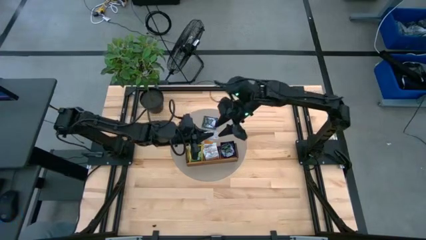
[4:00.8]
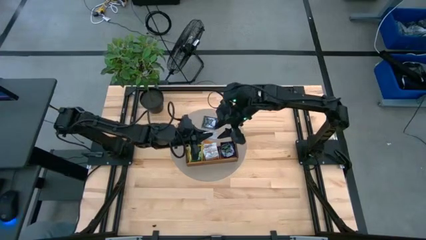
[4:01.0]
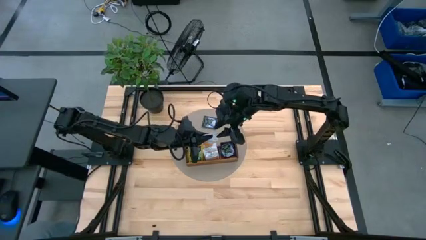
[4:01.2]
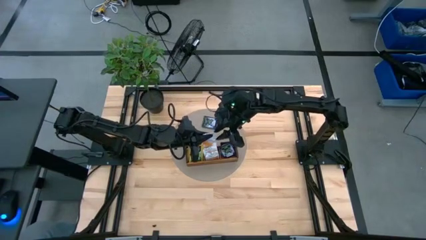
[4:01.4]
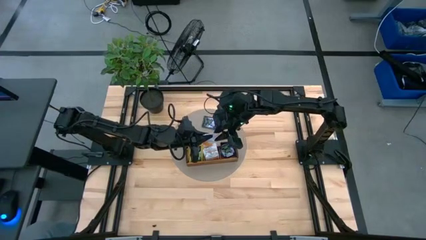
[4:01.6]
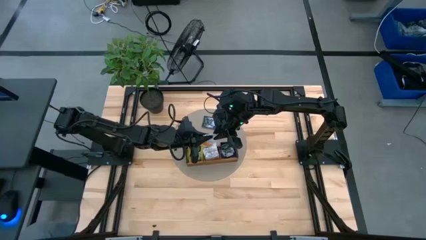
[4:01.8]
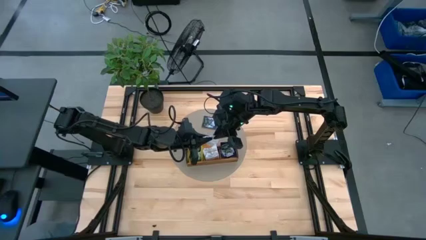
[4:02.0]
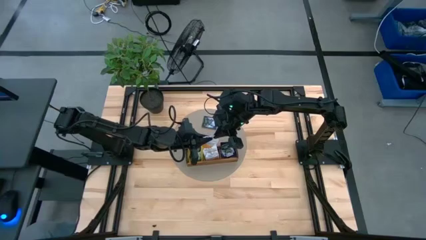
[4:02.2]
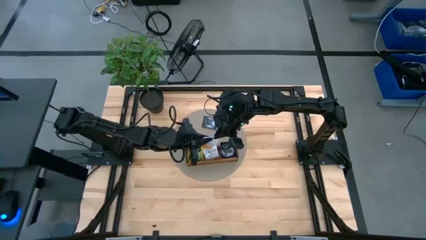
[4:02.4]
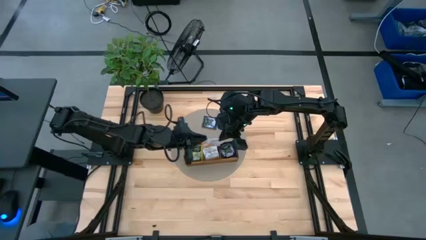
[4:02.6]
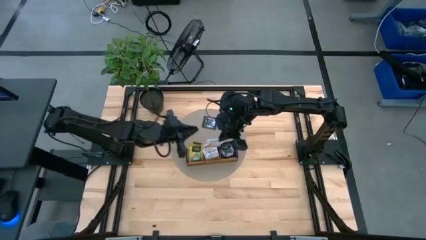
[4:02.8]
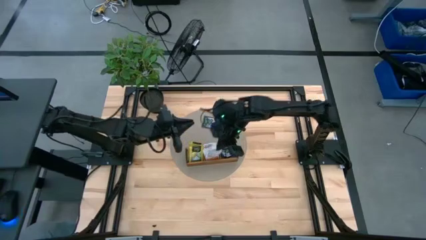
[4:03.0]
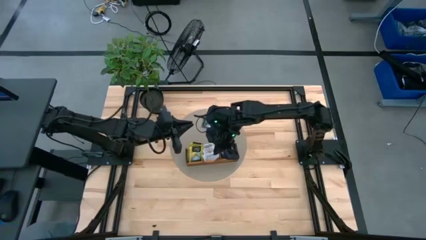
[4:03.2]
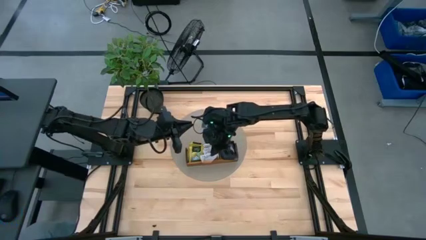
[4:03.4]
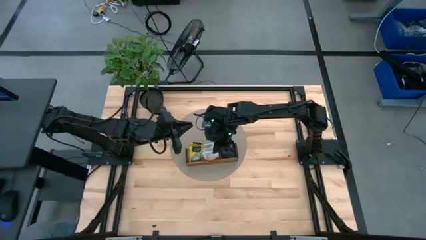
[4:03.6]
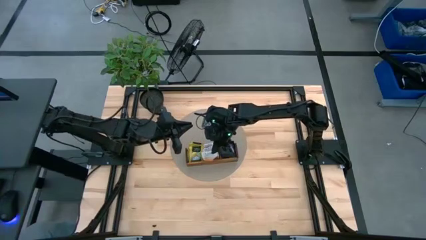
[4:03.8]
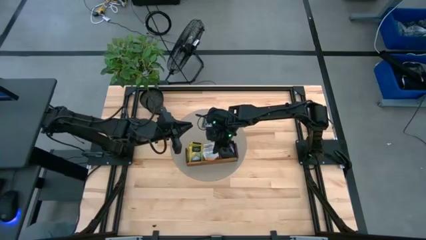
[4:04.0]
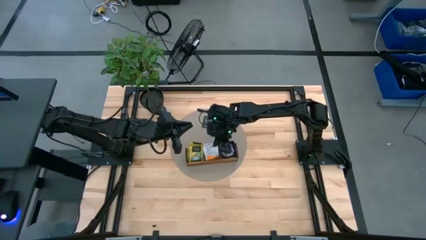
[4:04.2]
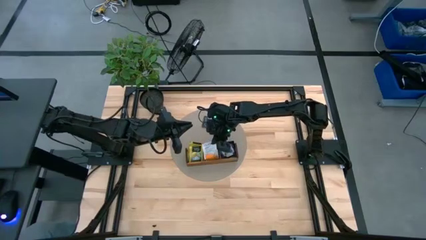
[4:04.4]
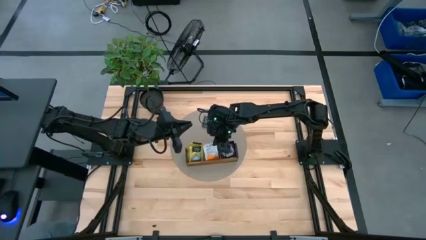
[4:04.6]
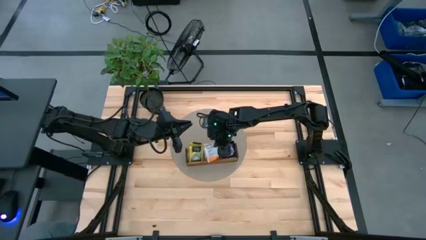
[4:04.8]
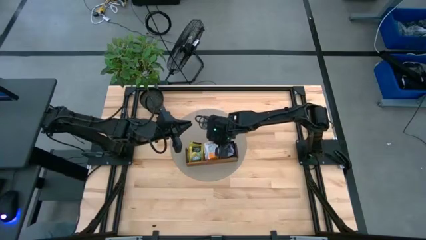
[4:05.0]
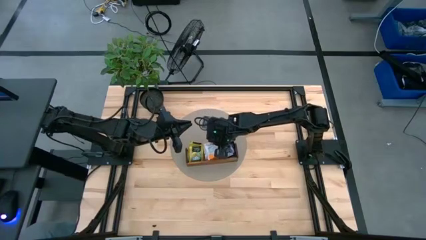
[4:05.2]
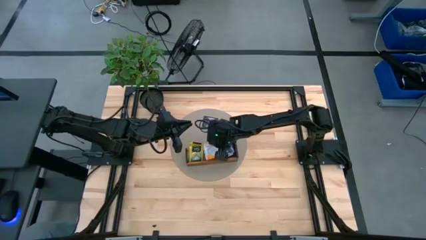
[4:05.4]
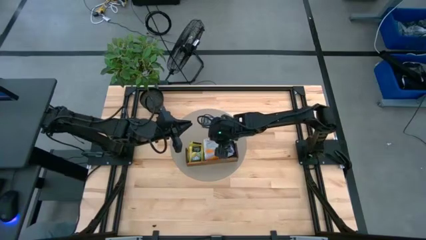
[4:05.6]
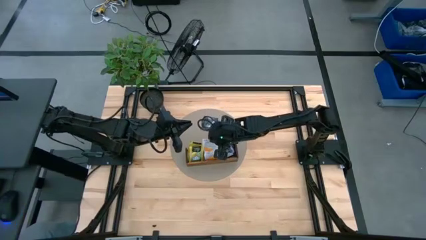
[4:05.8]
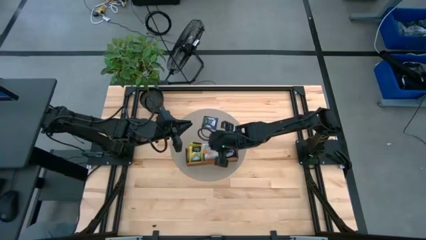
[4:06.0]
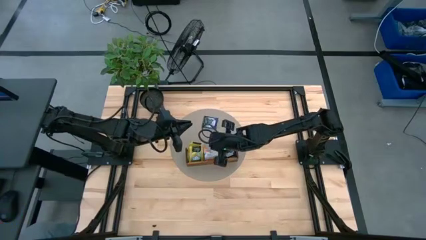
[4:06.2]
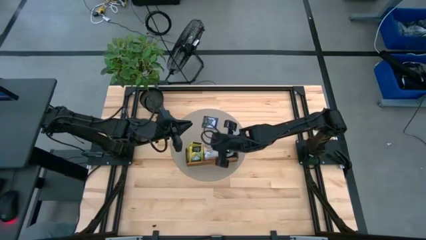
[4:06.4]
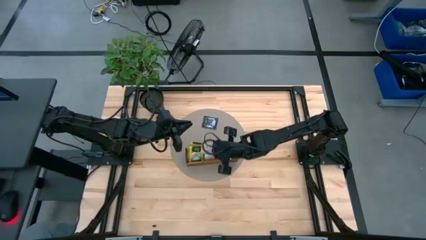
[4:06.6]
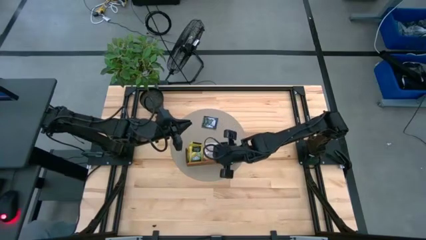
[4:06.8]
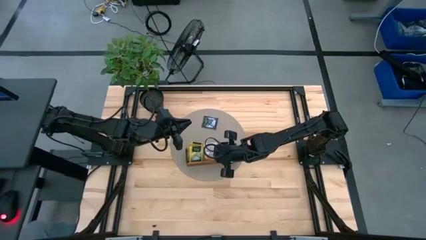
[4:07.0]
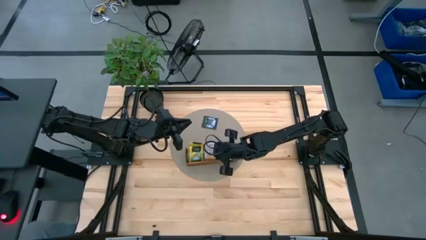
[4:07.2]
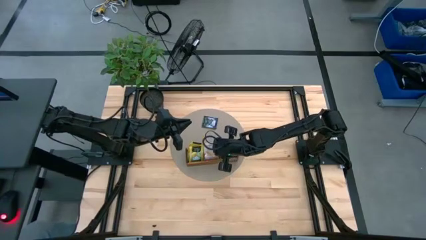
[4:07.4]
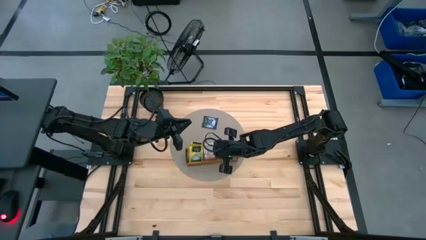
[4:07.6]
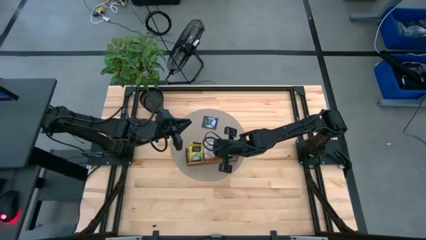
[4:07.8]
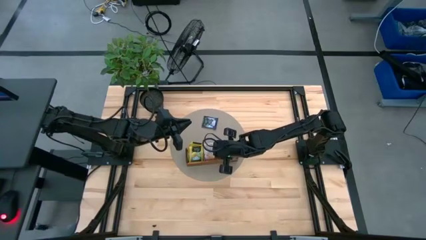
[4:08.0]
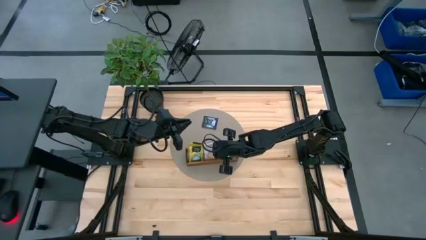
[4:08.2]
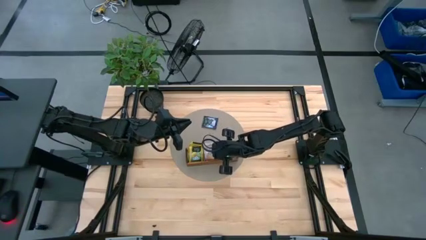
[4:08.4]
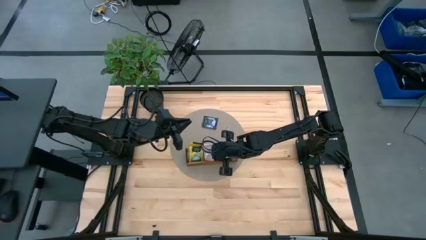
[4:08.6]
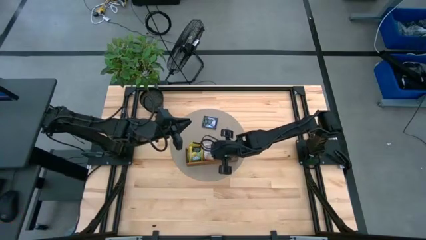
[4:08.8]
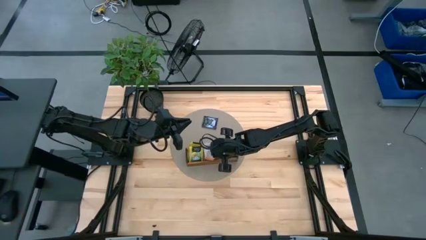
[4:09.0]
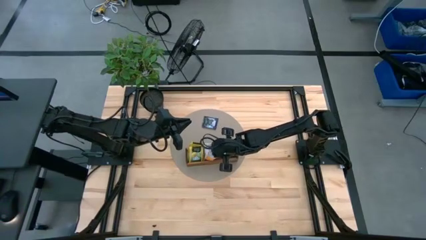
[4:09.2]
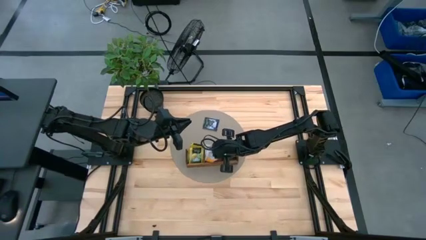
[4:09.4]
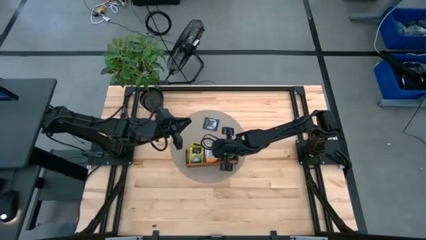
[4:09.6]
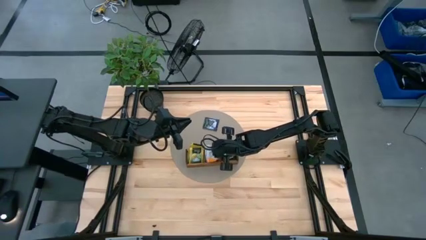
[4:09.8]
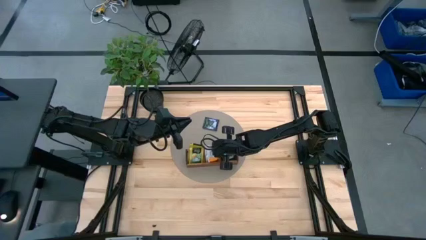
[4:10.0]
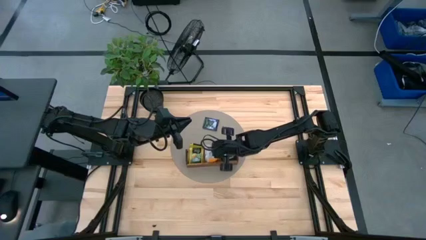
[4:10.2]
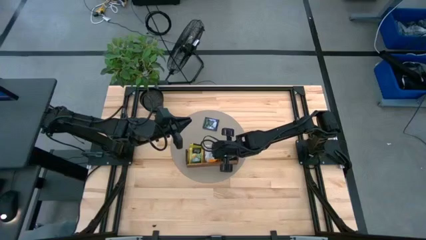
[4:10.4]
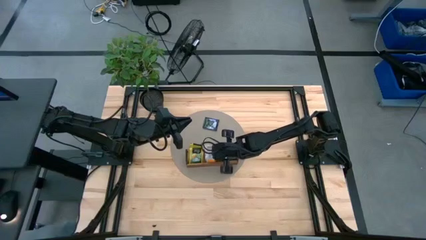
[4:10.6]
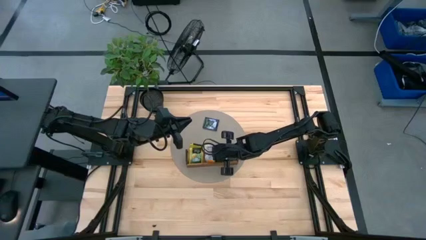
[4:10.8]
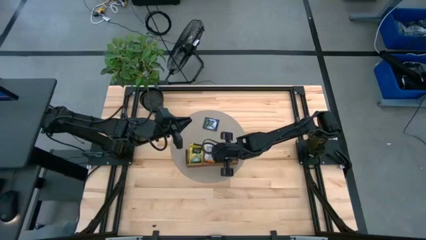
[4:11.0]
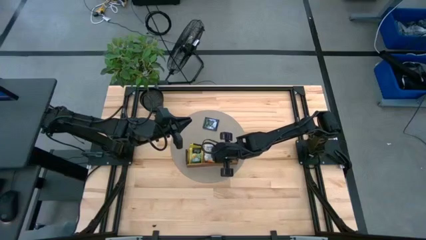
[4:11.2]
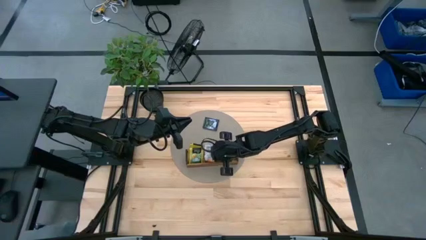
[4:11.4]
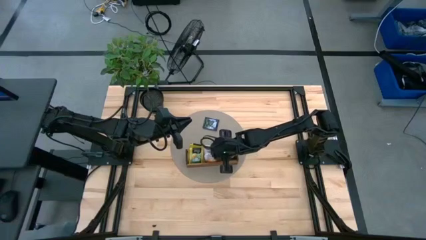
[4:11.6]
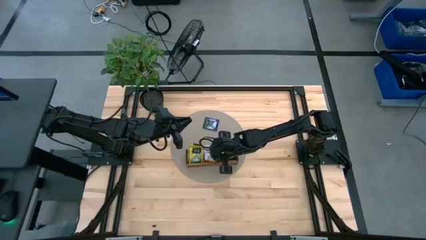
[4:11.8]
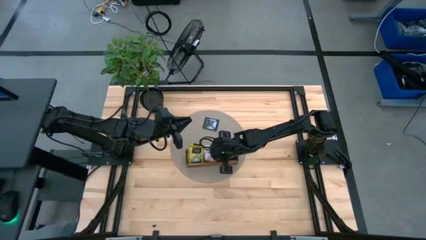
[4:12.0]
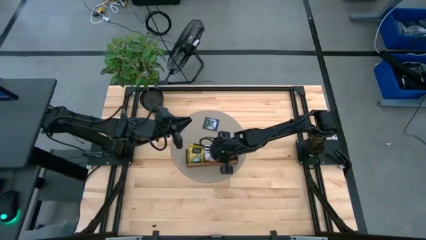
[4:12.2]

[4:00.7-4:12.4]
Task: Pick & Place Tea
Put the orange tea bag into the middle section of the wooden organizer

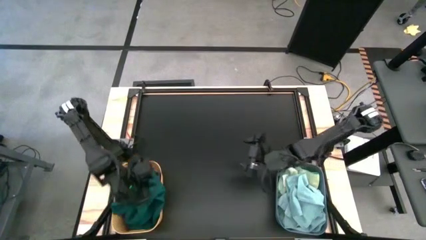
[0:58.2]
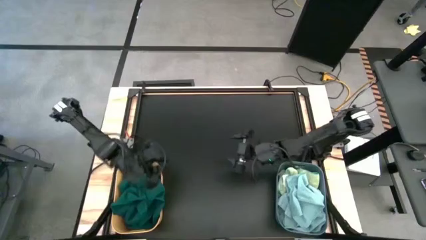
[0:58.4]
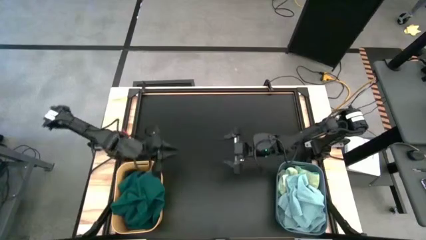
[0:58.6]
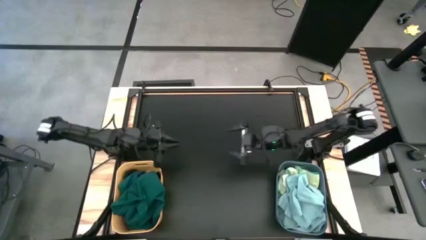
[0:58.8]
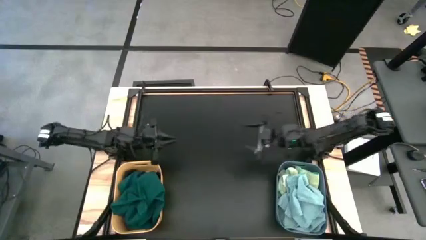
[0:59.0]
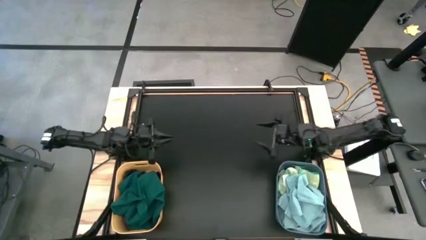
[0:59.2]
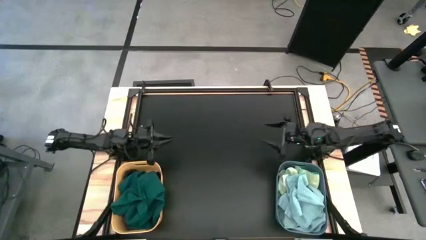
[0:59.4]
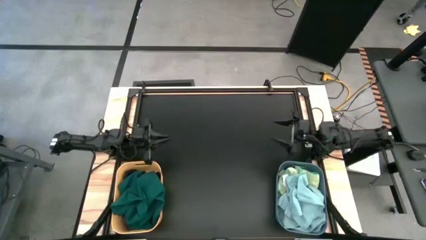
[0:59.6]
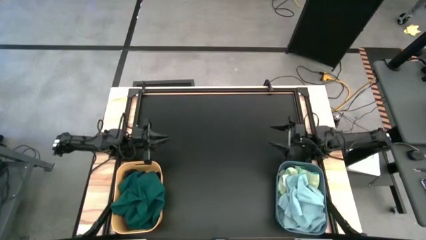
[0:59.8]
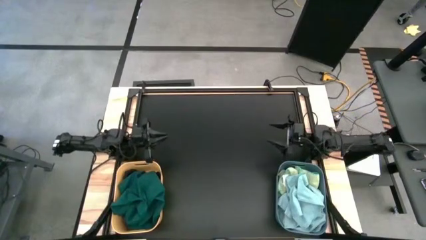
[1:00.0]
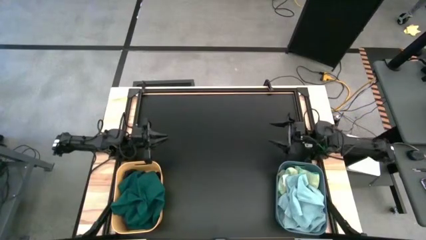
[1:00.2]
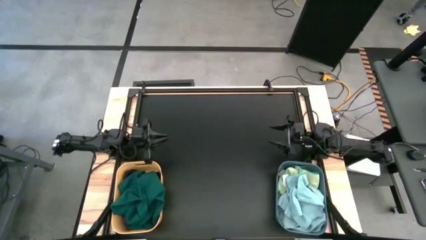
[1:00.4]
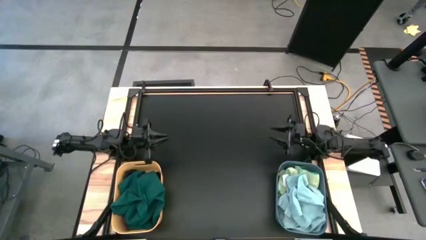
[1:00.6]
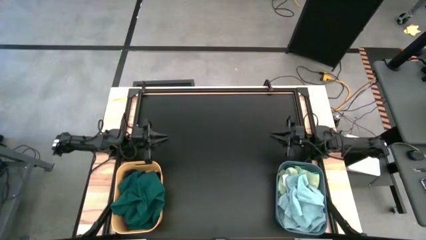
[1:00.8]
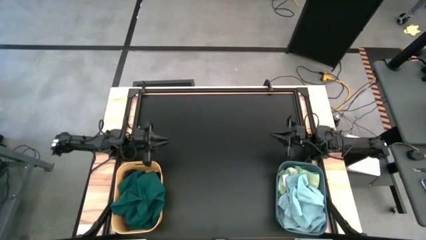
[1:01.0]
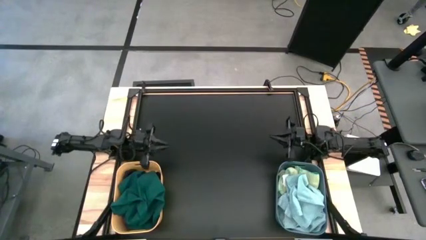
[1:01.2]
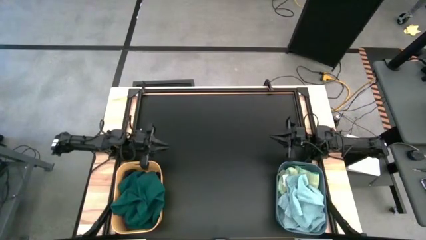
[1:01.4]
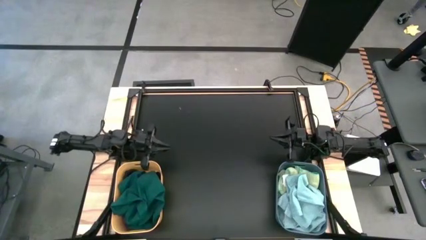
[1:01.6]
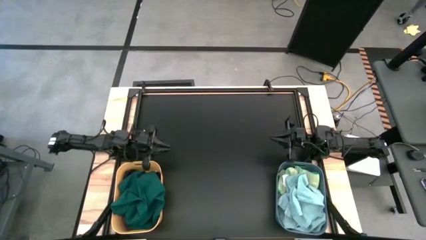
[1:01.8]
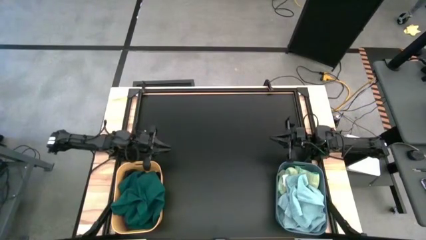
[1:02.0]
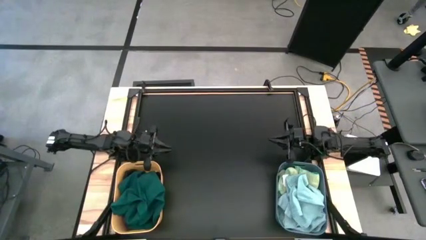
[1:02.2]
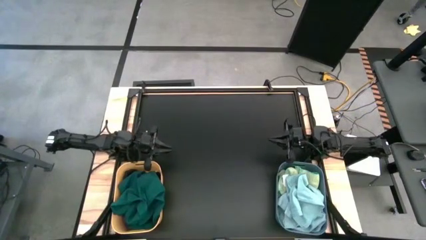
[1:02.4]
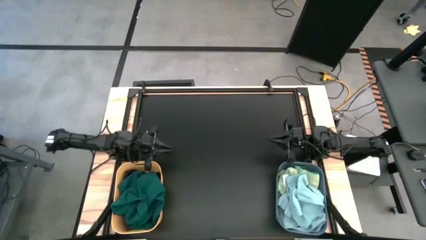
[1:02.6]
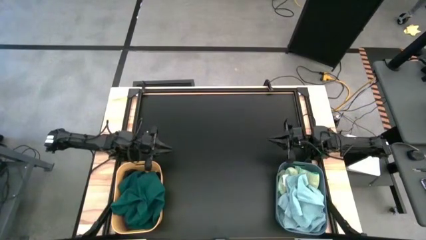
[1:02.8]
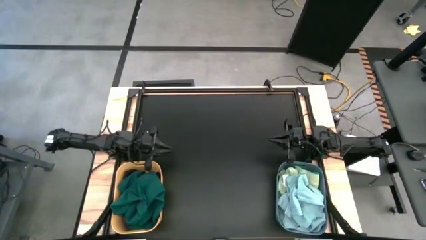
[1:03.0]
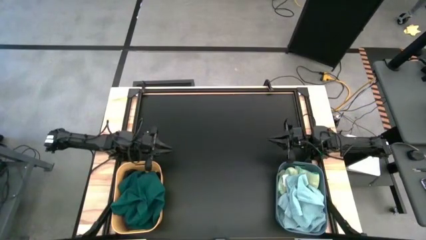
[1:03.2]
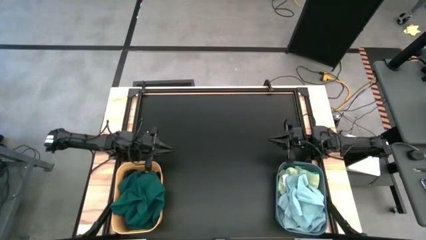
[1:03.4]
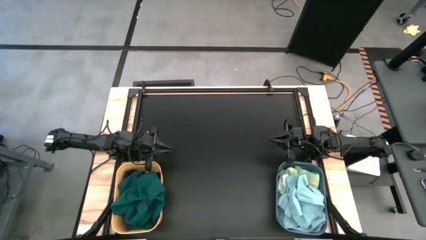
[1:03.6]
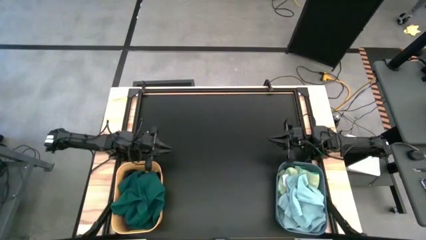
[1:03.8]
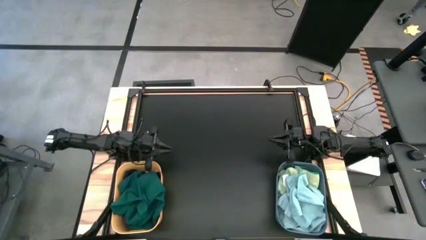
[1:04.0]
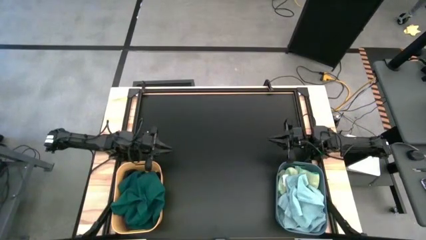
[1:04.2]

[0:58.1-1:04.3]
Task: Sort microfiber towel by color & place in baskets
Return to Home Position
